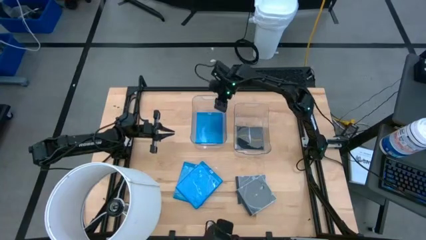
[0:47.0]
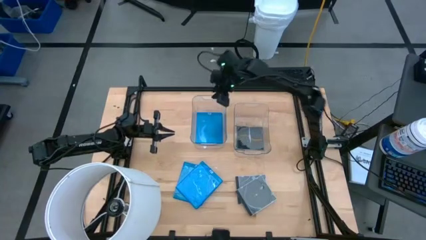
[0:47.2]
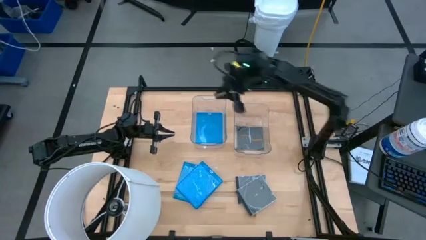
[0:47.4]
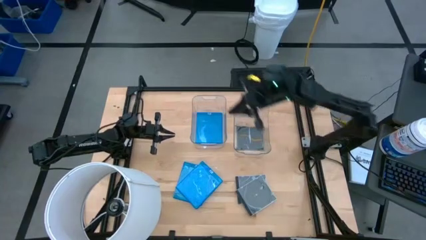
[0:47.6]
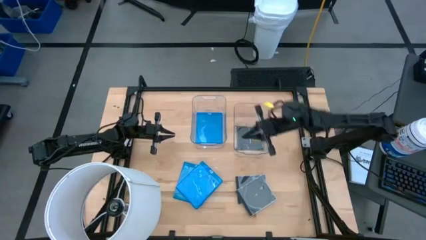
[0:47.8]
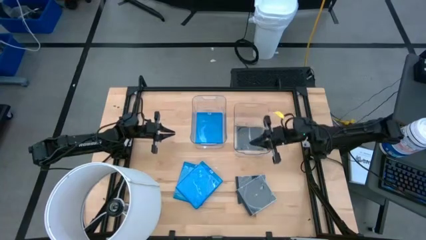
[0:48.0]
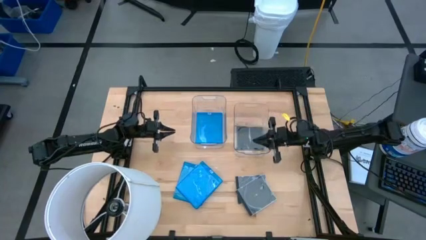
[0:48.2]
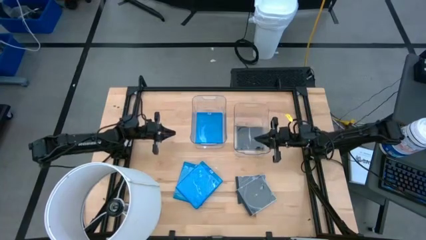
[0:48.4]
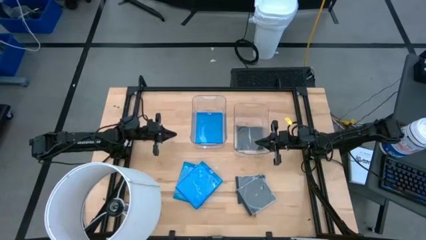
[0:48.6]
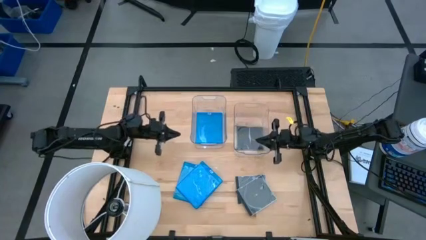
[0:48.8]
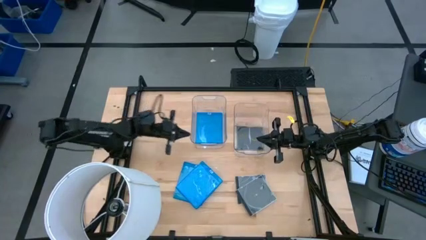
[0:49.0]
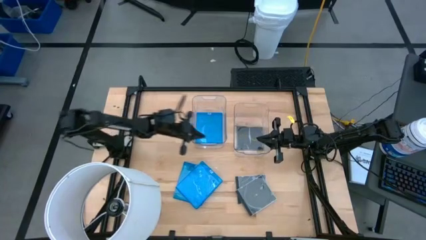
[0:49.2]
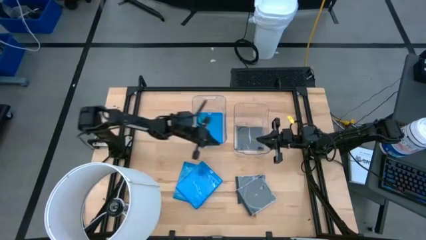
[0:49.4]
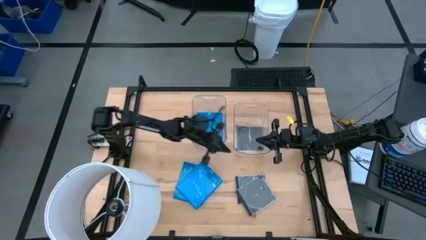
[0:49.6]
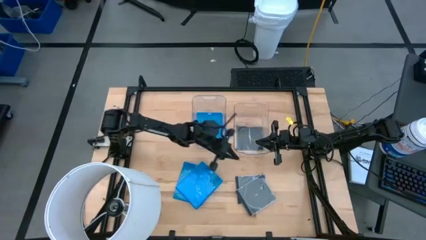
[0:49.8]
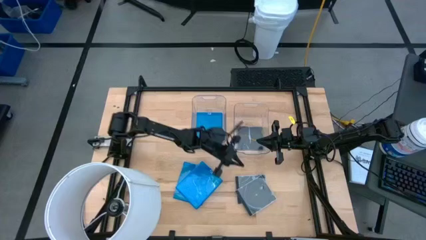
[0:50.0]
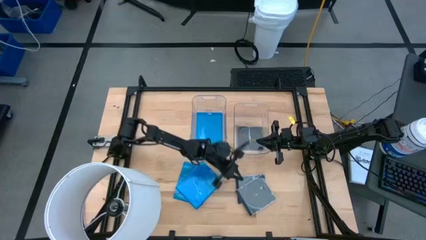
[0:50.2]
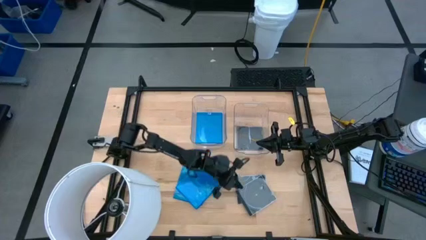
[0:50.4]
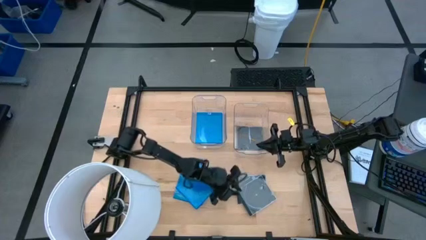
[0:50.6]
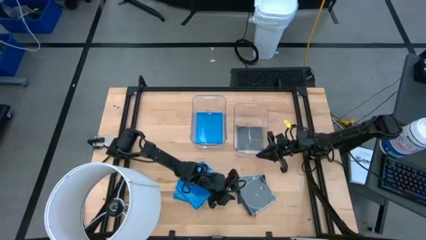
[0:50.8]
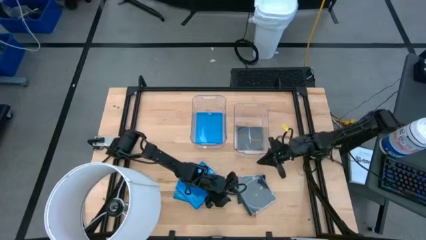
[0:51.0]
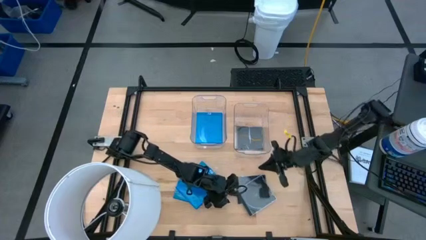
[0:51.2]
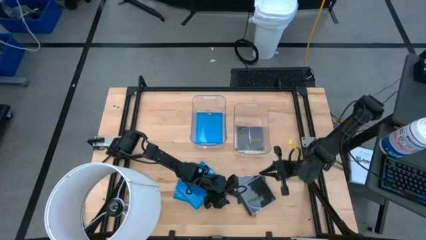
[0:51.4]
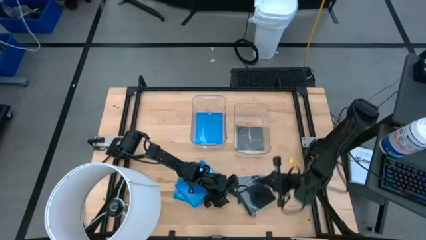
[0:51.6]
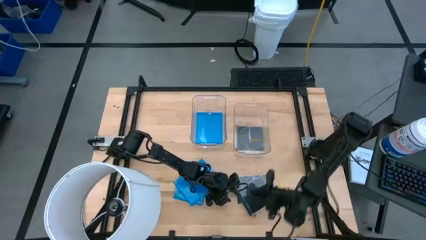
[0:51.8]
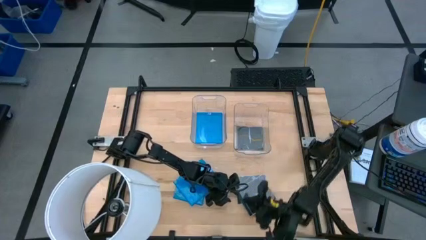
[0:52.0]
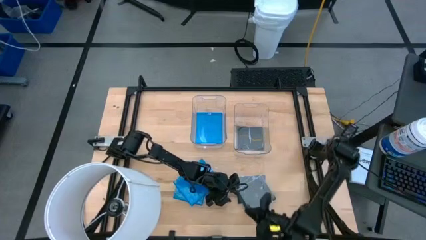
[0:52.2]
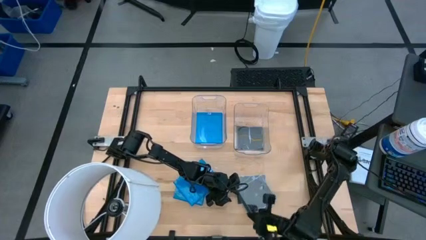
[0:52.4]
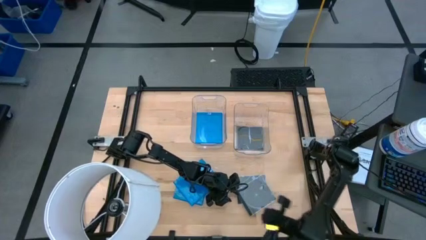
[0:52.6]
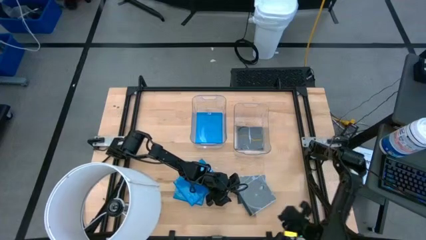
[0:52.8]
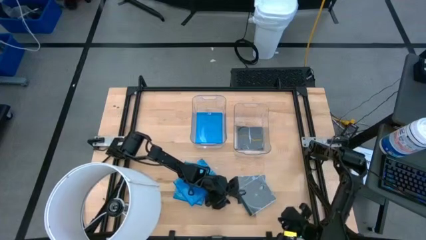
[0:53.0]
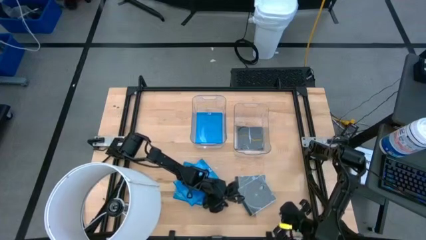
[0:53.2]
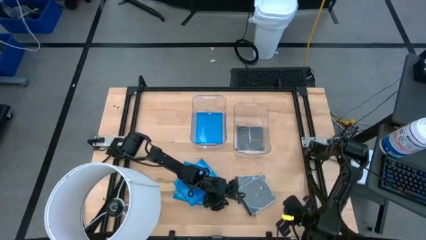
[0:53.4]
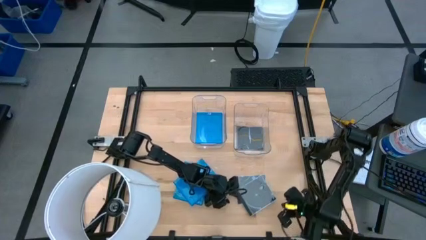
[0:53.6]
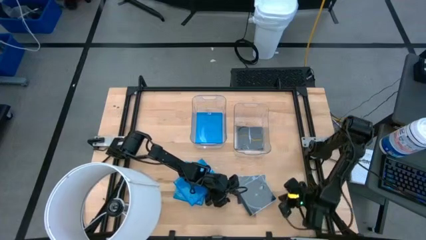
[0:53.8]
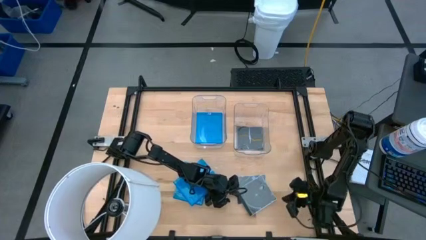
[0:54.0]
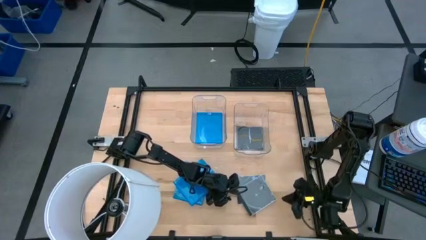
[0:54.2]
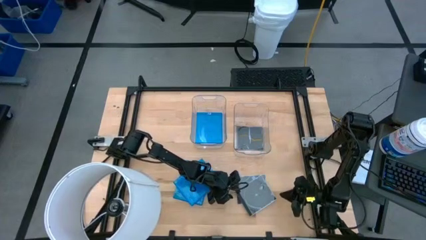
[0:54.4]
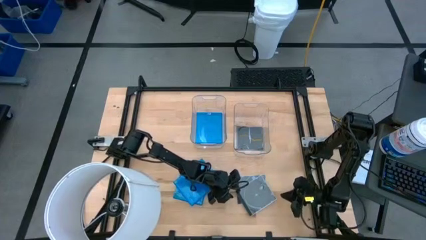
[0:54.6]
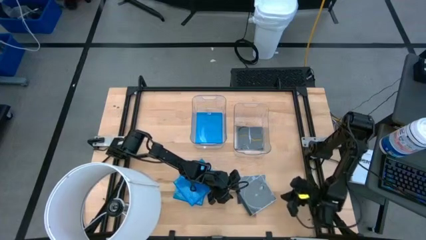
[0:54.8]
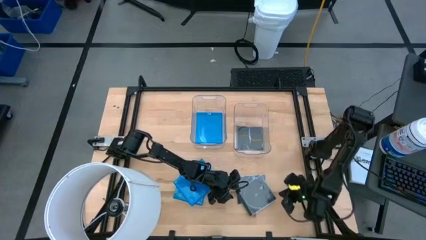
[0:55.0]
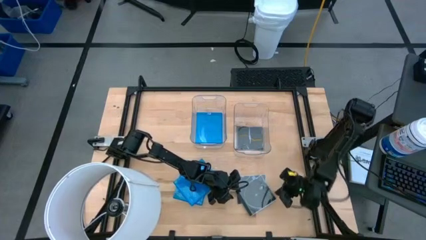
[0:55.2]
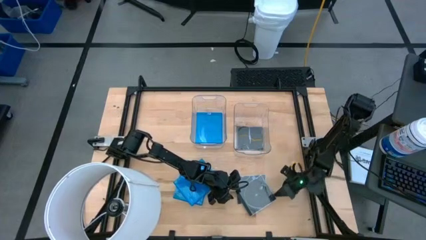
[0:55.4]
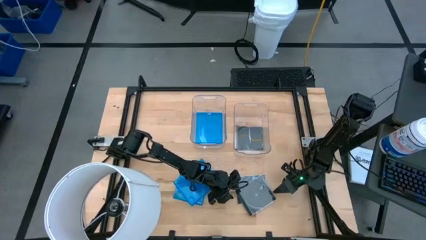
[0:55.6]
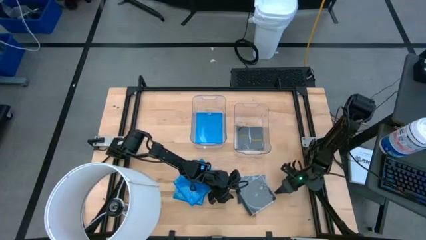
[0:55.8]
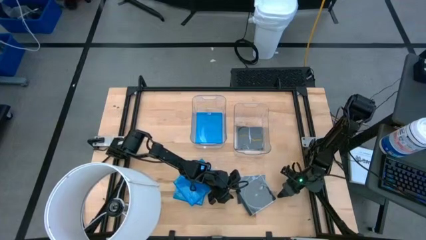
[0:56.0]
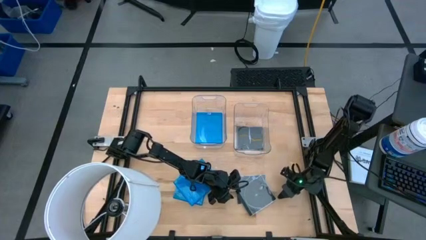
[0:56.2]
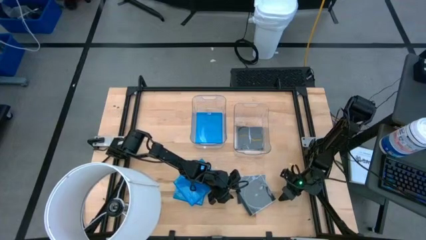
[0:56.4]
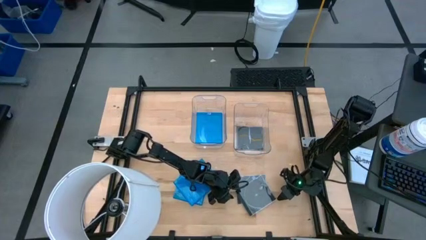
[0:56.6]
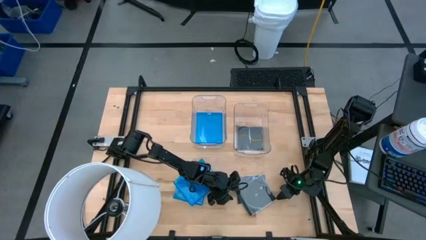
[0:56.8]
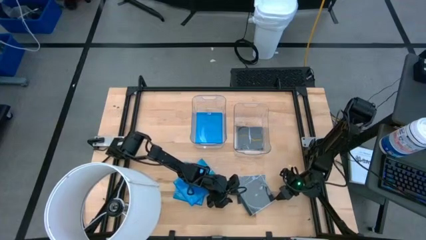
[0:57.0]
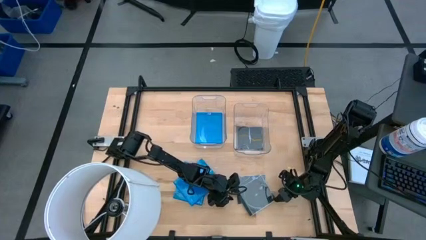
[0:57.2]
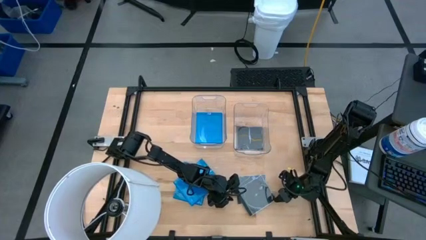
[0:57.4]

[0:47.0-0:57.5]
Task: Pick & place jewel cases by type
Put the black CD case into the right transparent bin
